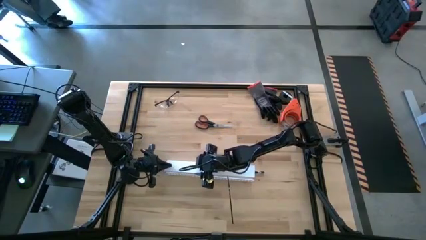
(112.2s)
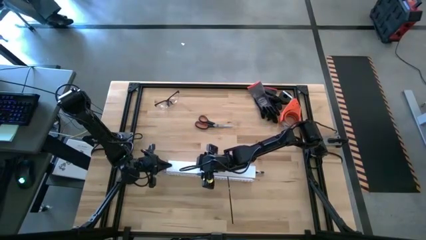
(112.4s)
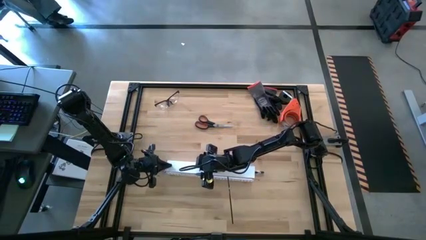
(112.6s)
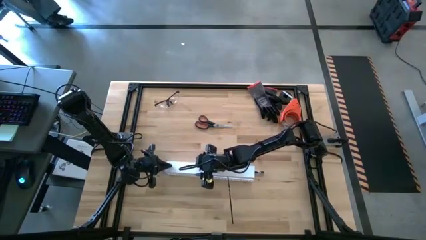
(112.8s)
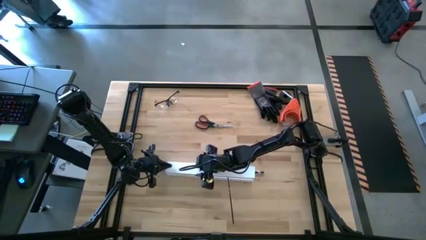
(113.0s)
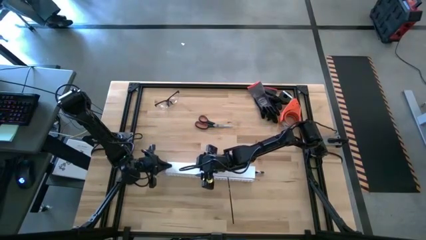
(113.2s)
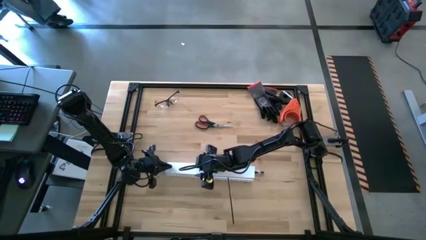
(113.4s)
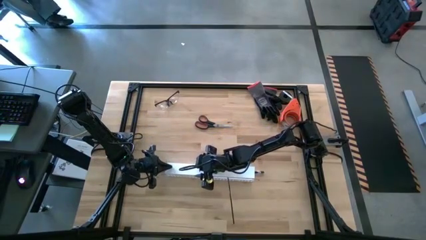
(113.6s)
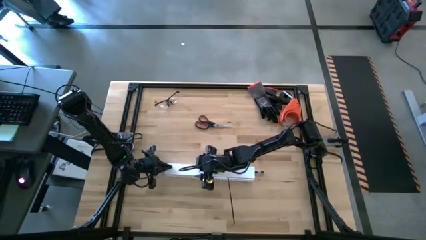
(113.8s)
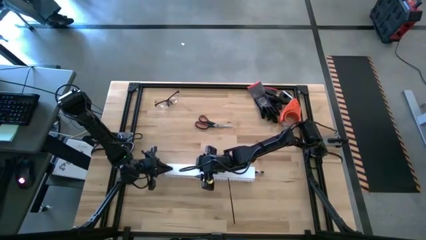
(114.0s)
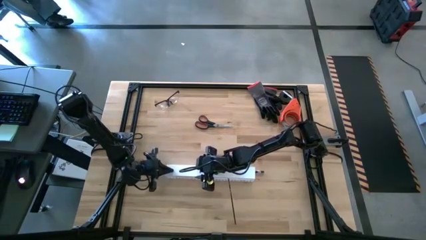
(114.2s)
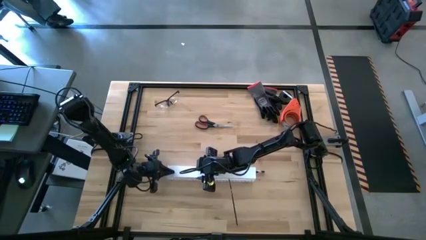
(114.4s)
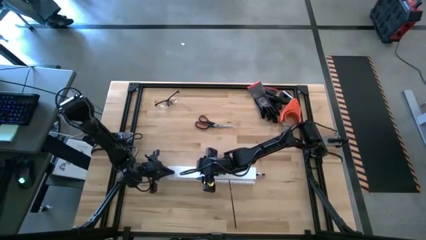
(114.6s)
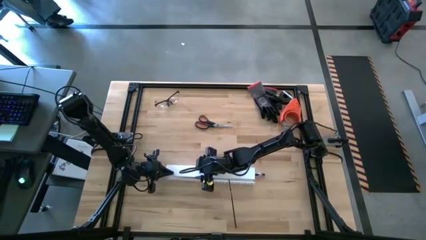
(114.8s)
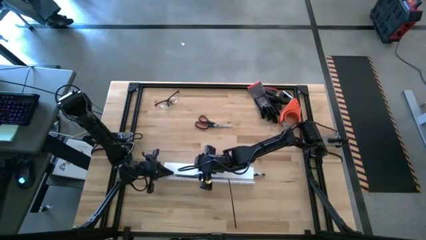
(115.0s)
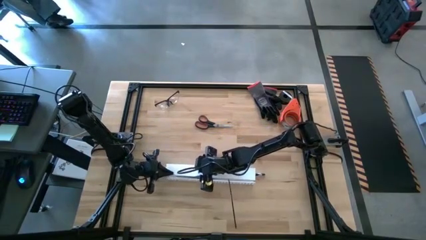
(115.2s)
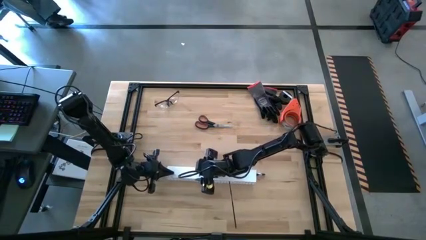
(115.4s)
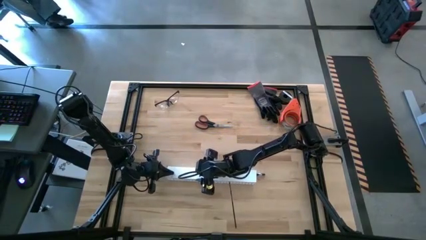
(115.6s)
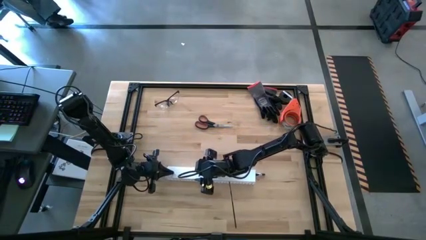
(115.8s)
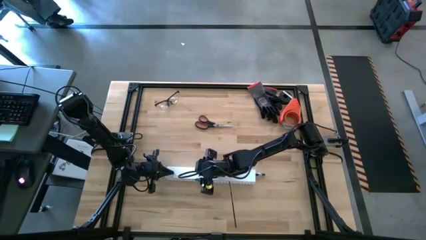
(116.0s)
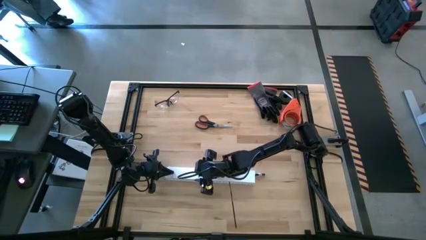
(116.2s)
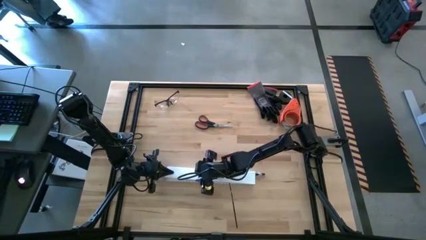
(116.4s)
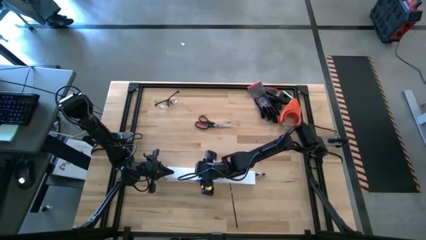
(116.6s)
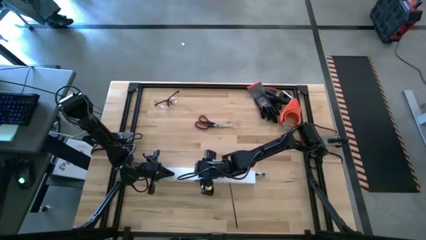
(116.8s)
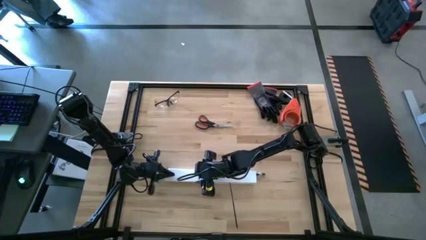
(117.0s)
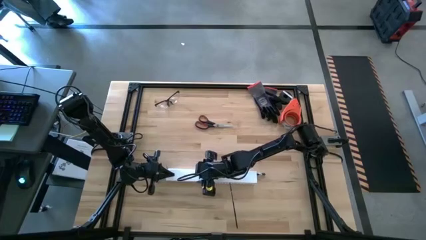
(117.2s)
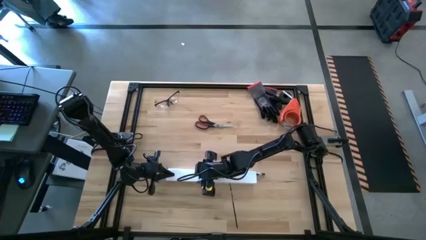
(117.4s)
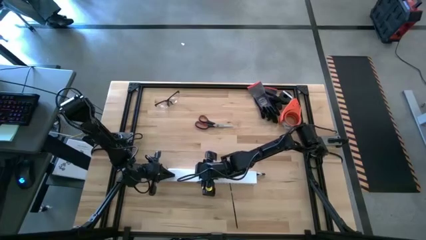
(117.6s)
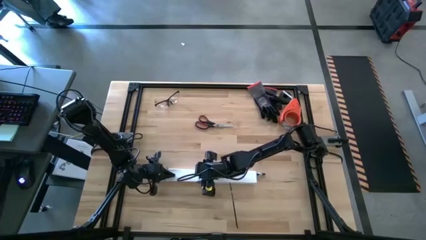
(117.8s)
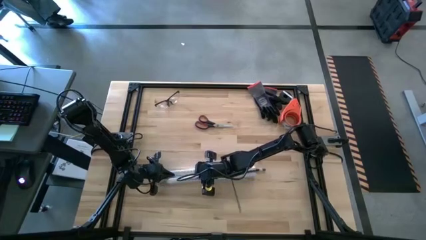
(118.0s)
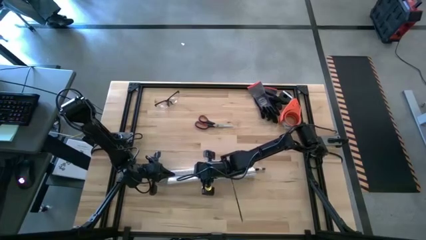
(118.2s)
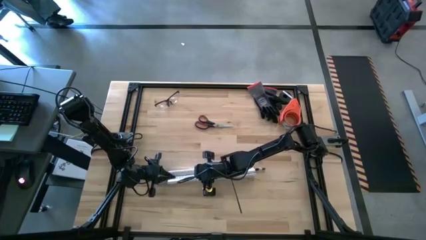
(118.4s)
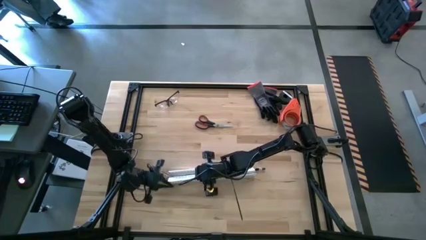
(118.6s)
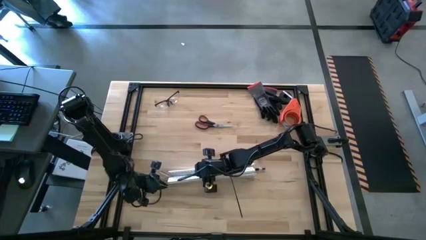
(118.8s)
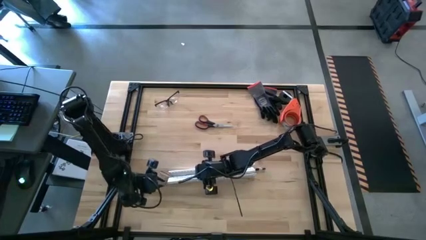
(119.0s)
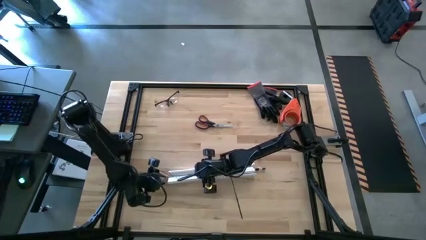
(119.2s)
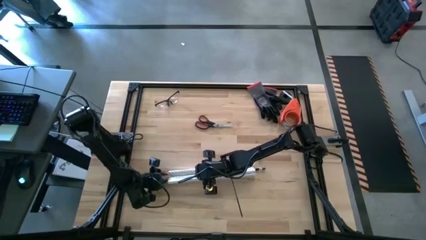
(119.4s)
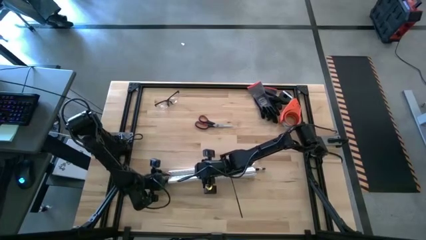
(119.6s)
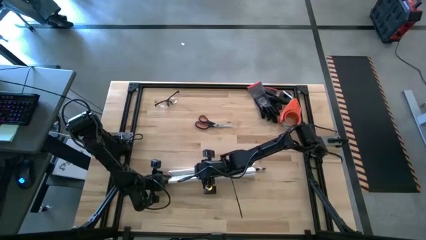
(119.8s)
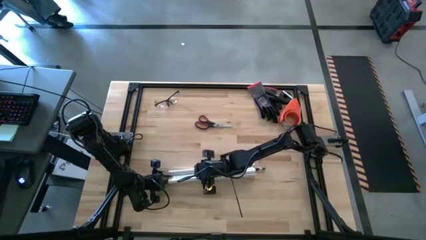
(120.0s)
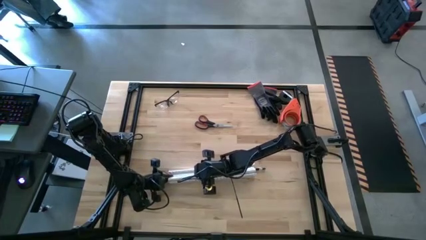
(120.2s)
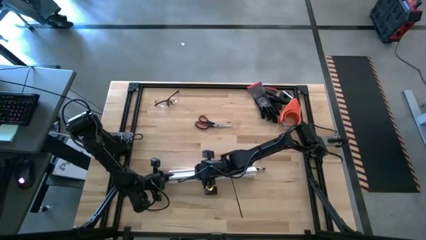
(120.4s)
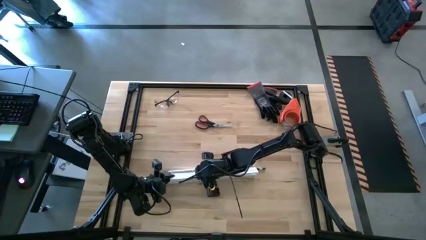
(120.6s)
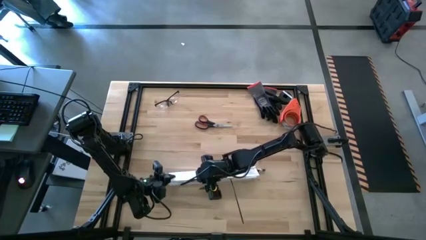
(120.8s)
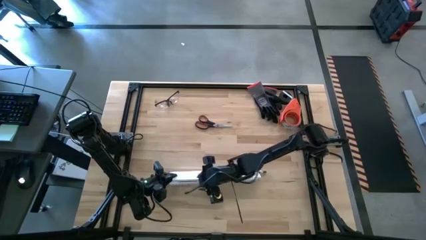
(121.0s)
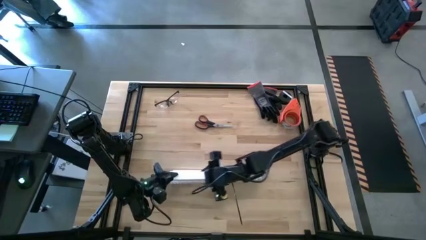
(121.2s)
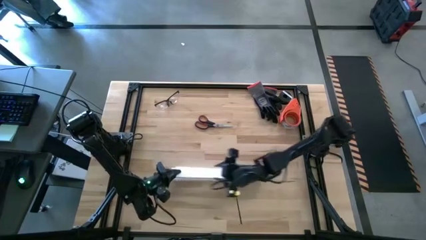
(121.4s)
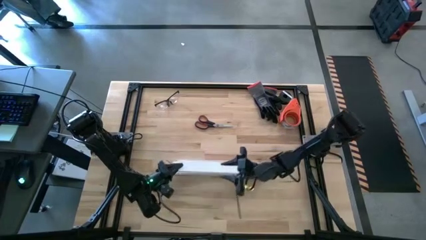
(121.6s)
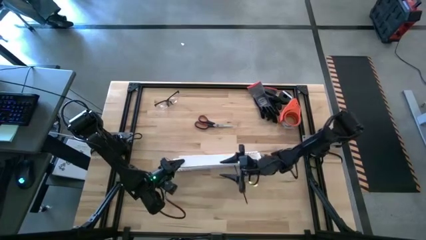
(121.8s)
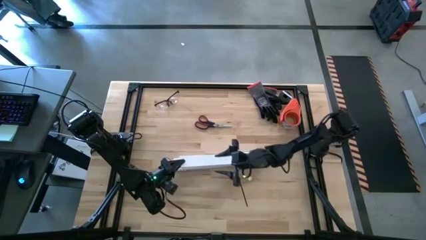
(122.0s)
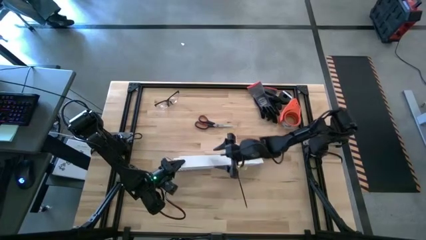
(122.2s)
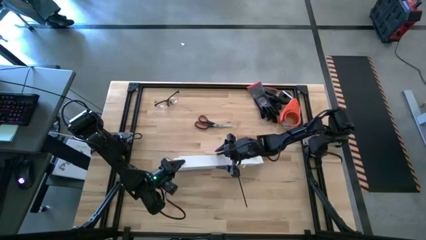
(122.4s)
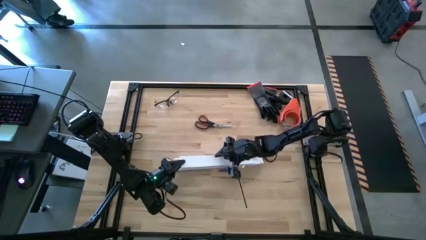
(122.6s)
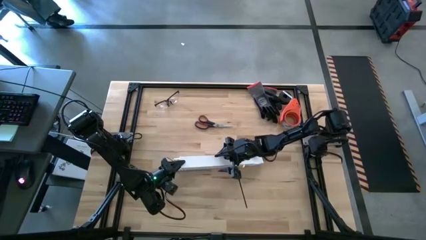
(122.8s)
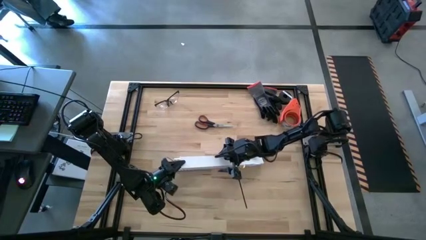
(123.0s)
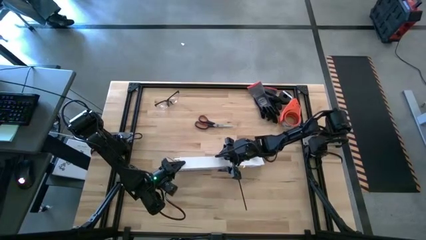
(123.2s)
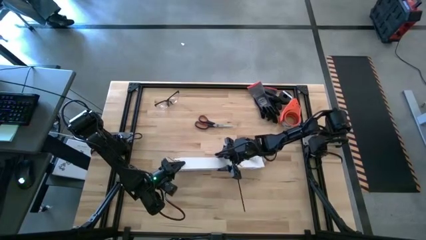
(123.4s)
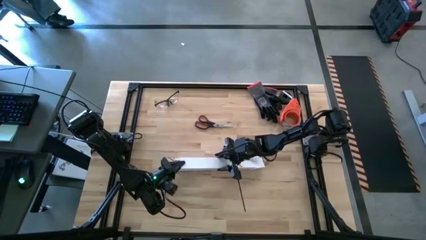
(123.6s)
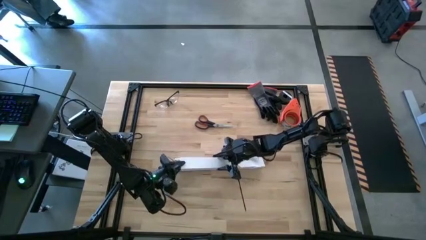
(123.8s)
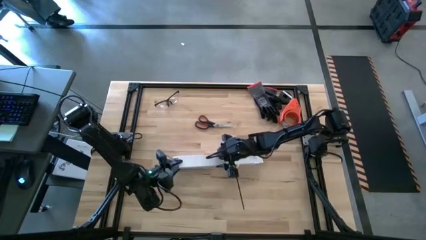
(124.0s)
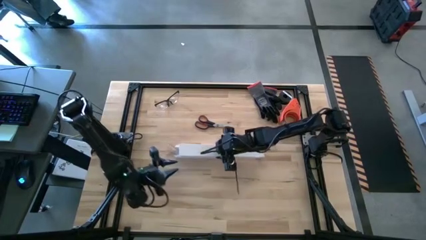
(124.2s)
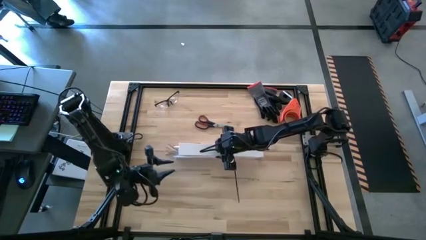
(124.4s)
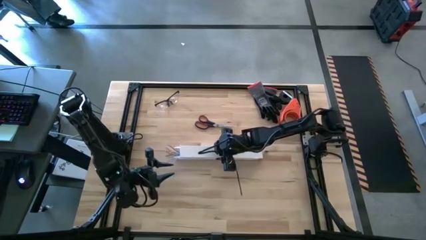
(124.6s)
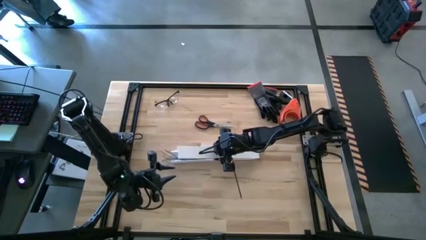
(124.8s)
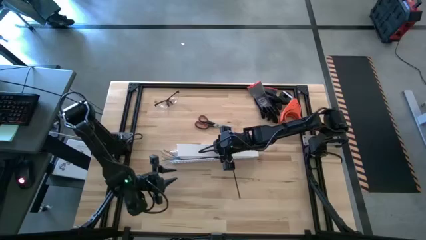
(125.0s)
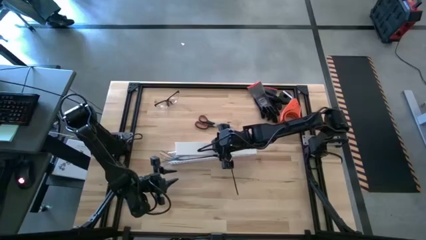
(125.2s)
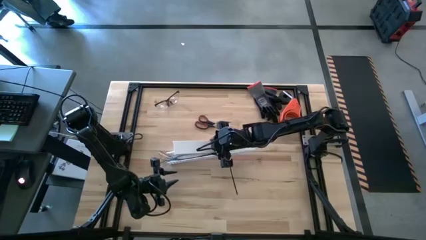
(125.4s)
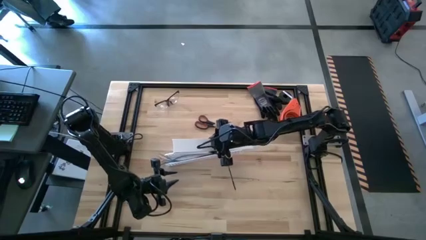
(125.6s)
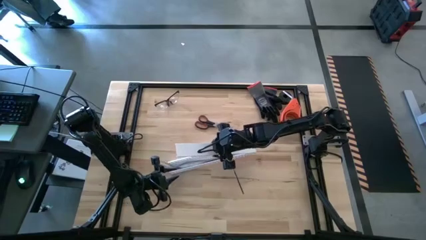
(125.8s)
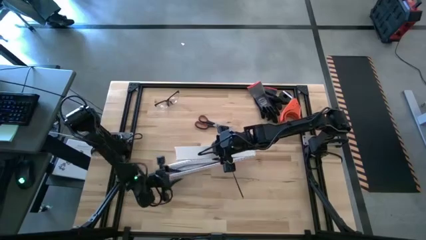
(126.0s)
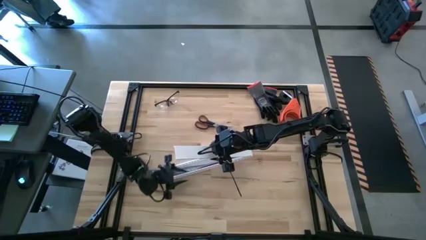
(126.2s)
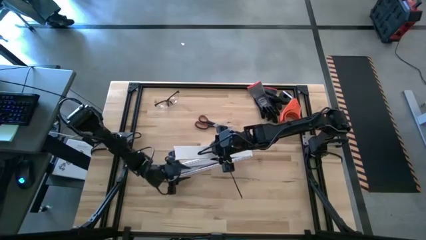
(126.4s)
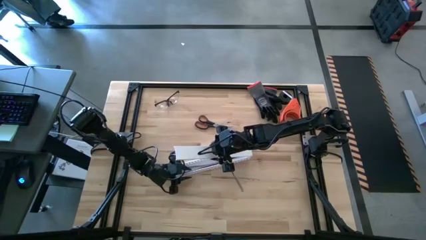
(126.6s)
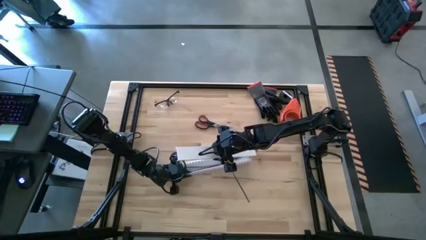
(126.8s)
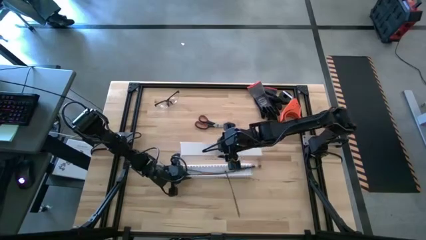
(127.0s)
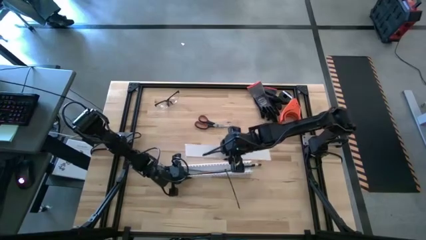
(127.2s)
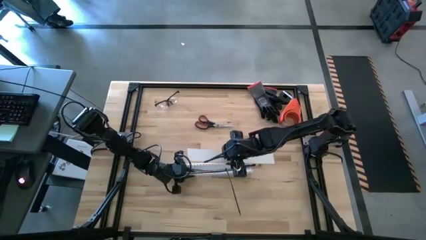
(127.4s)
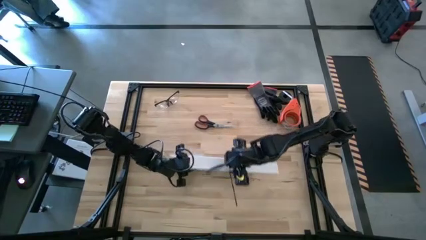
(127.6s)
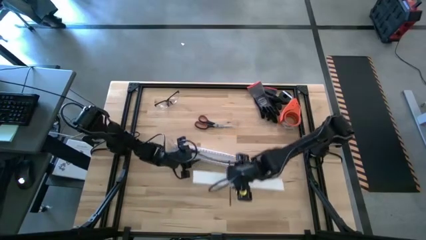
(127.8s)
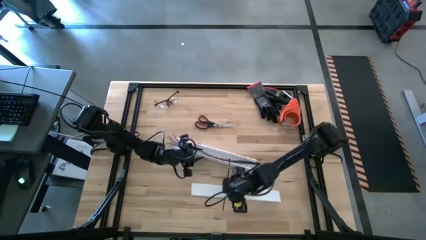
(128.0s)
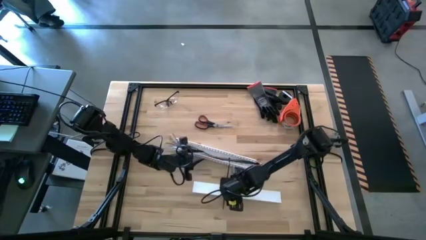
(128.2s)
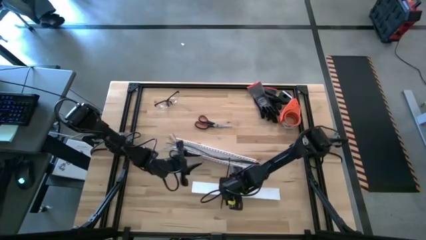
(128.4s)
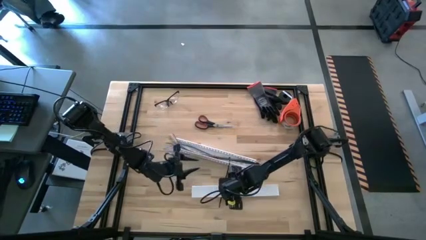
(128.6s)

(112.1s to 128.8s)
Task: Ziptie cables
Close the white cable duct lid
